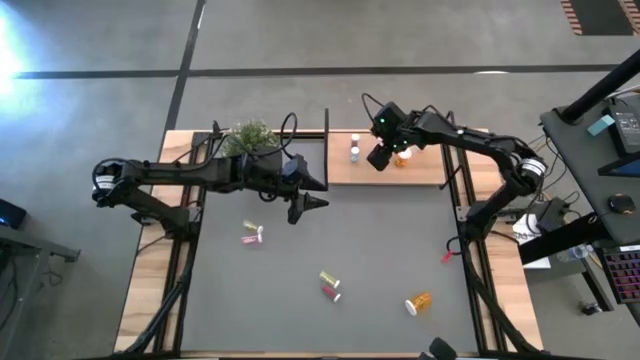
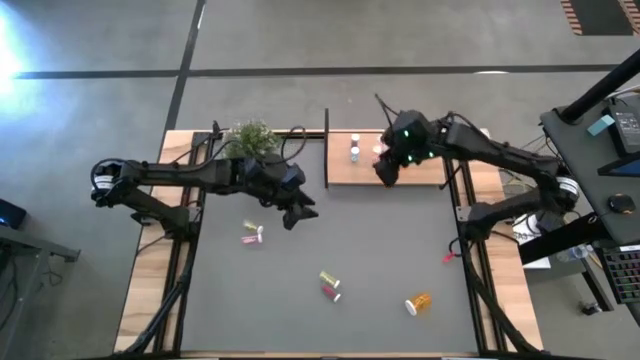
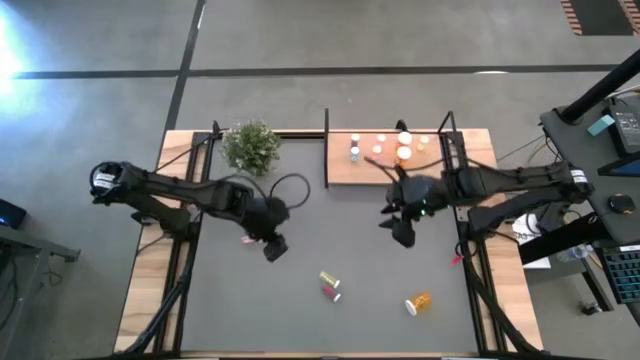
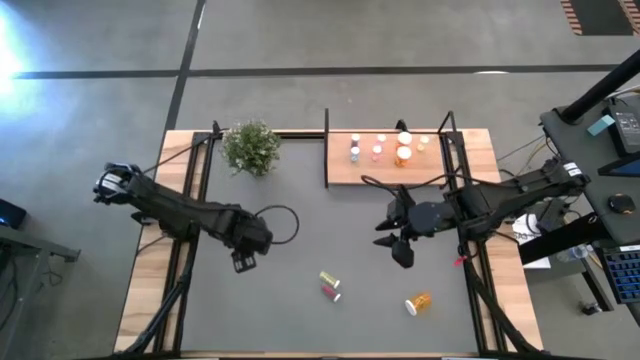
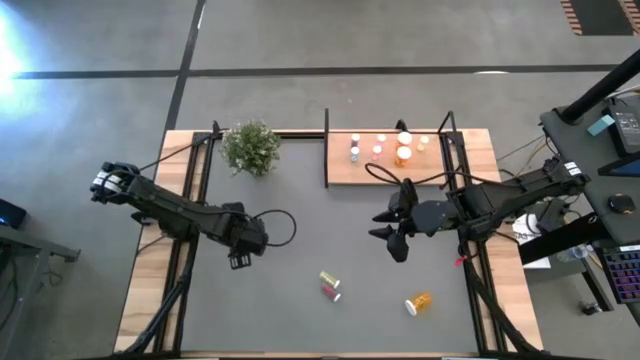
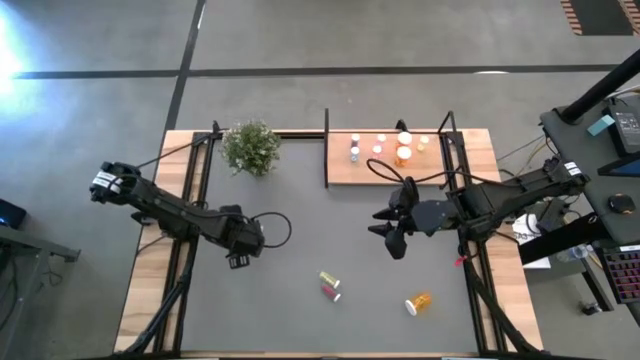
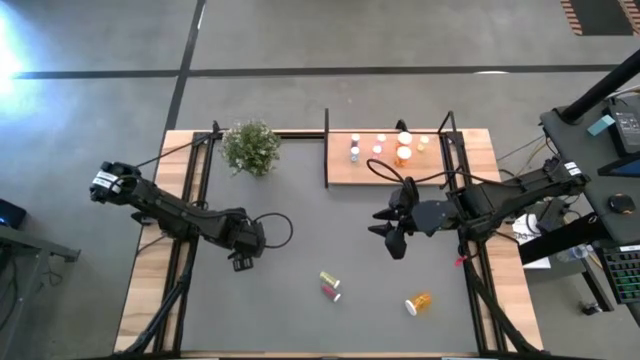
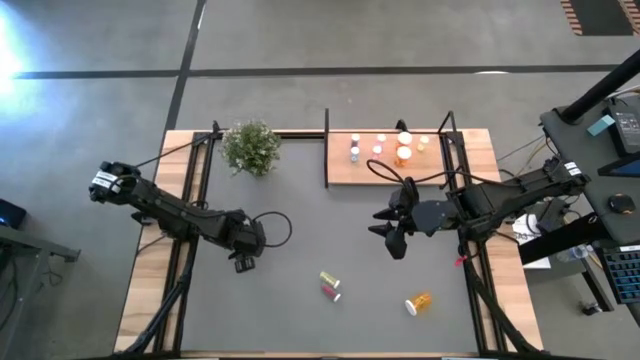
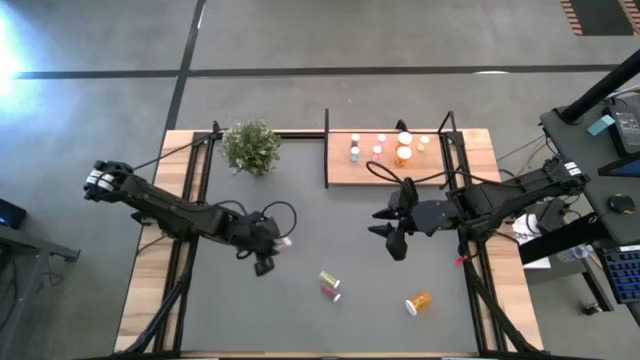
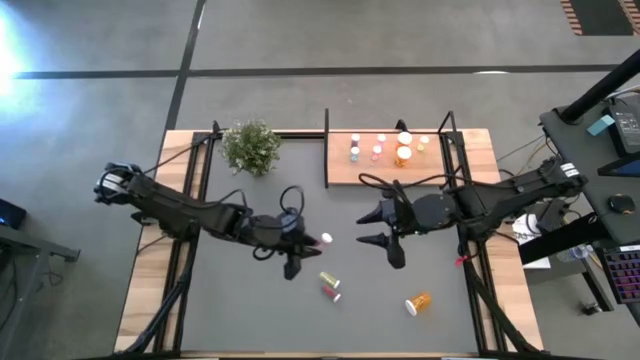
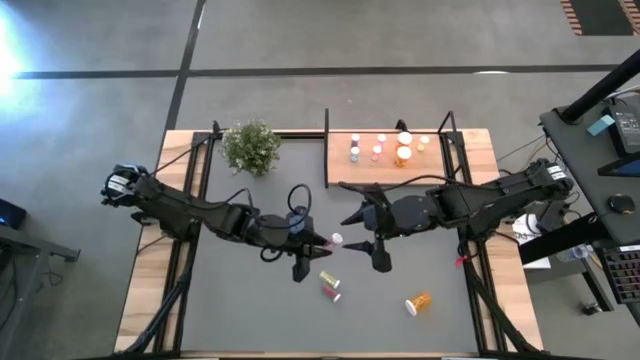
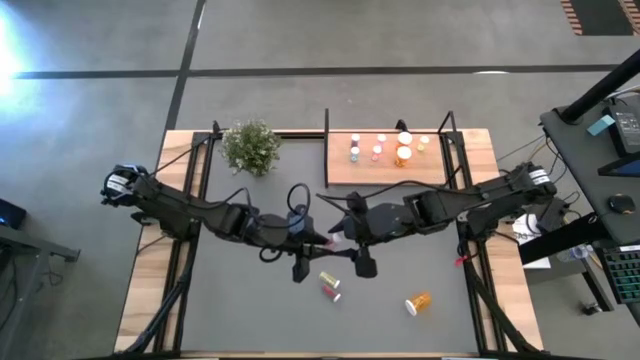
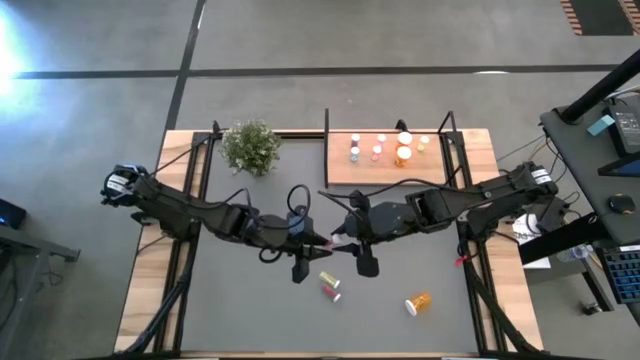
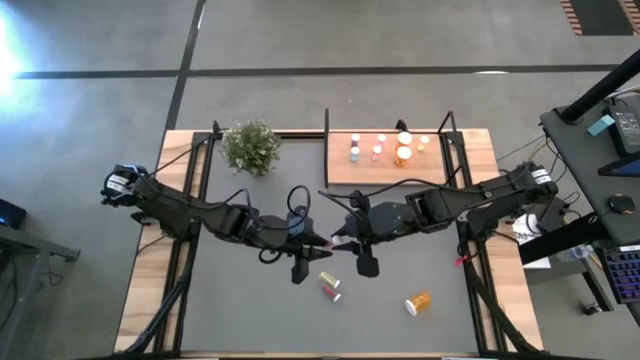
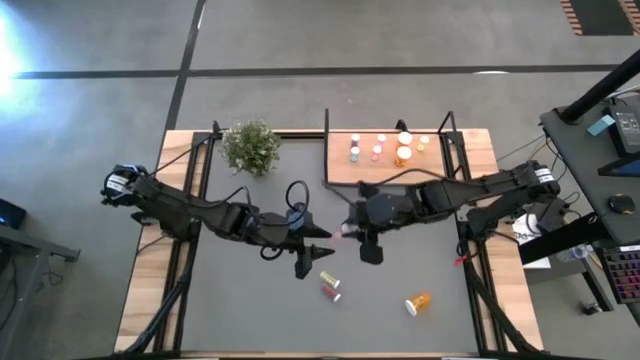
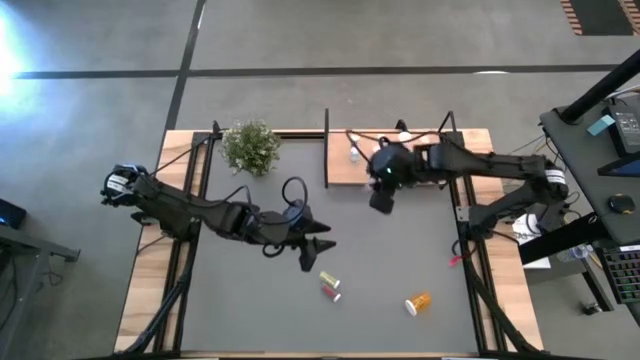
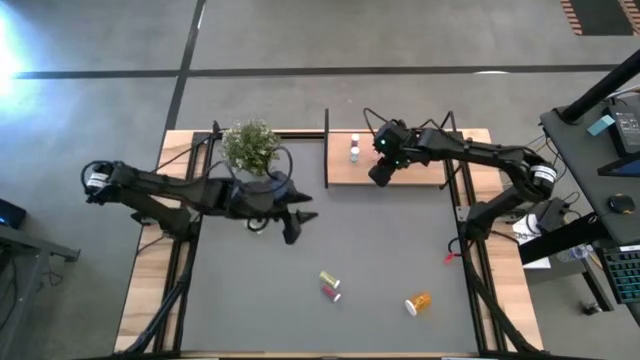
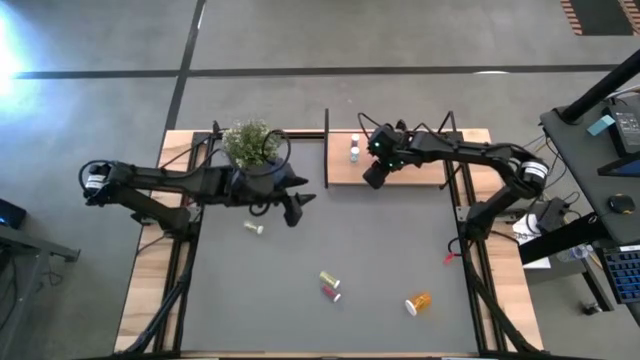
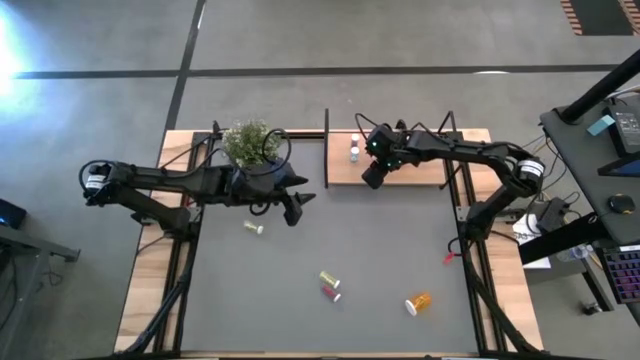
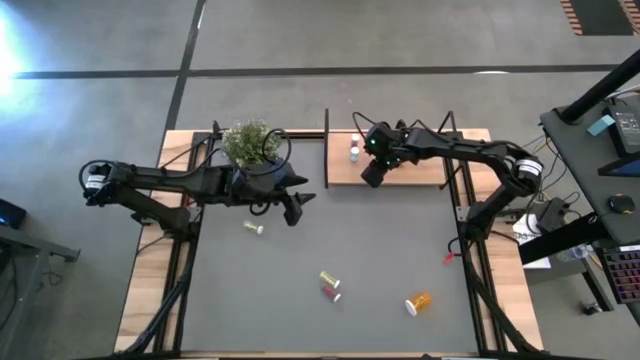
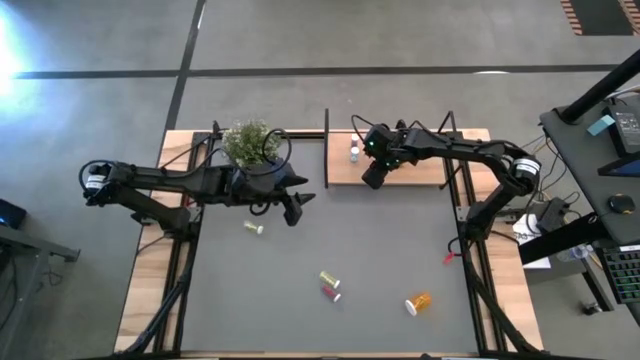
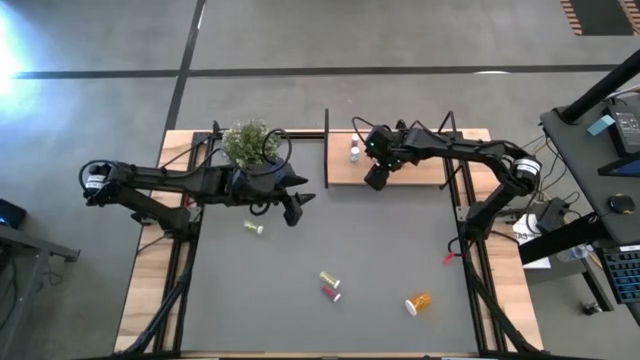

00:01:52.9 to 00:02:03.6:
Task: Pick and place medicine bottles onto shelf by color
Put the pink pill bottle on the shelf aligned with the other pink pill bottles

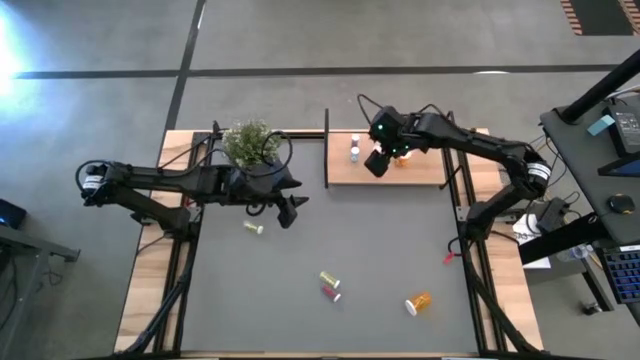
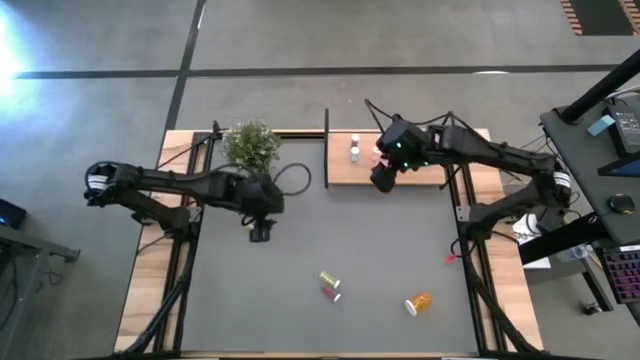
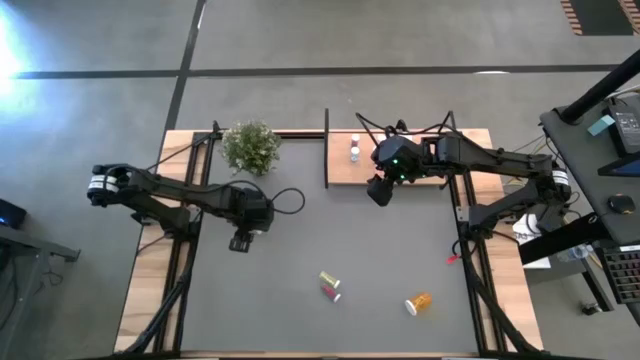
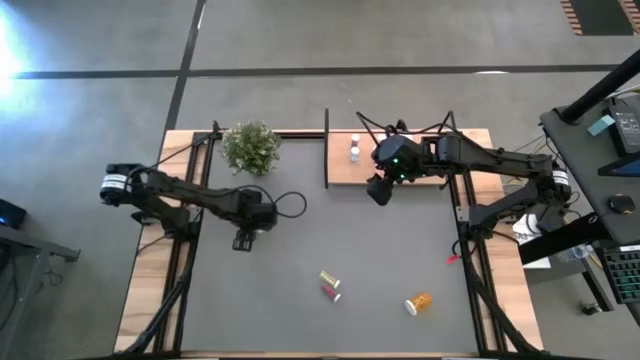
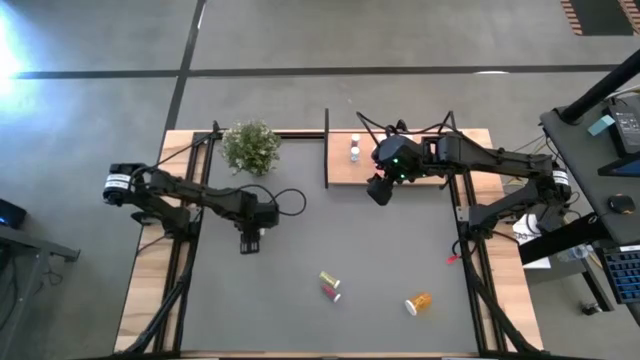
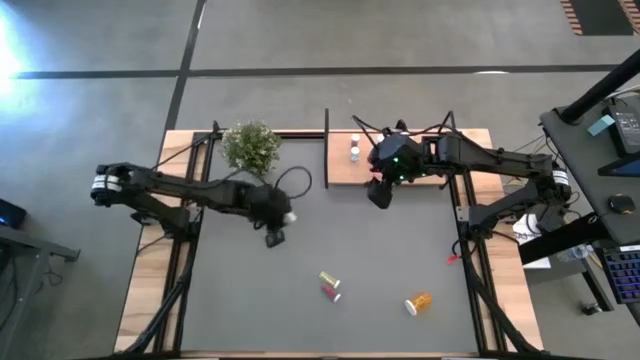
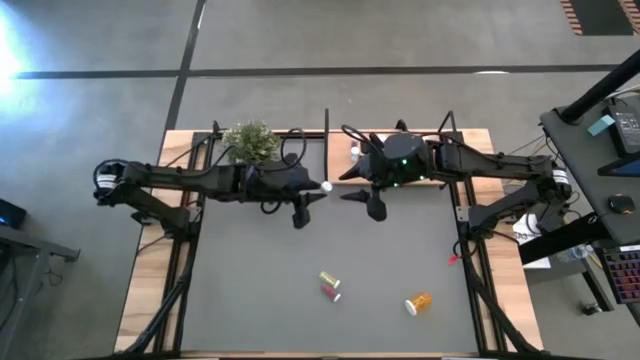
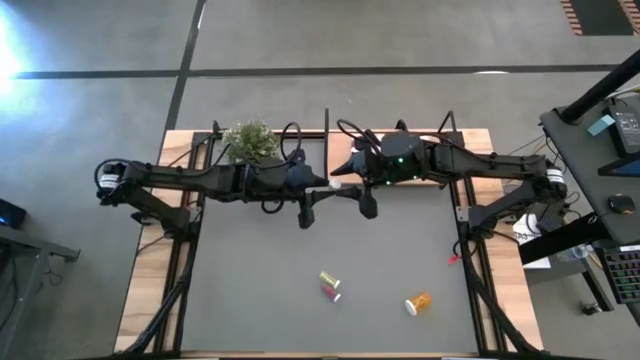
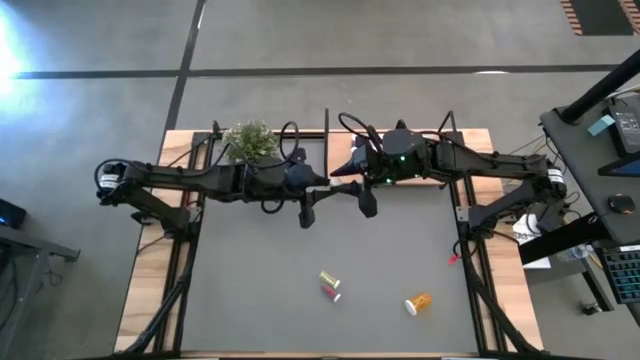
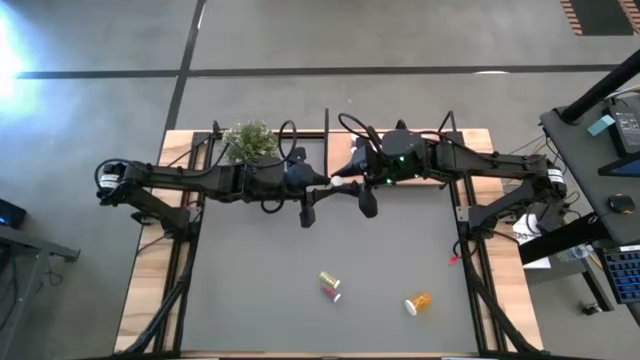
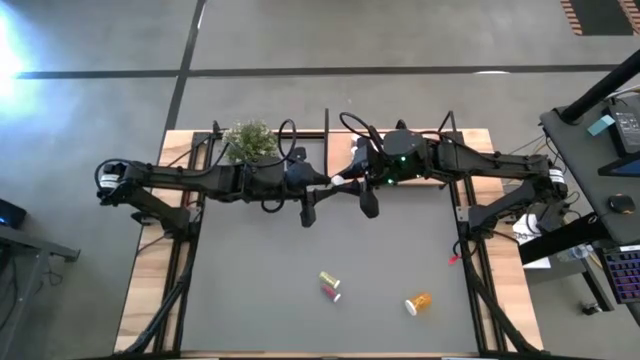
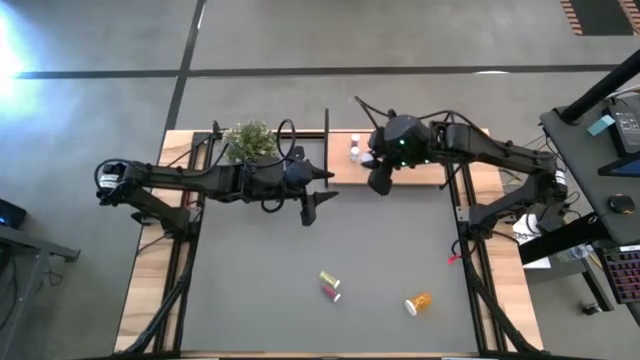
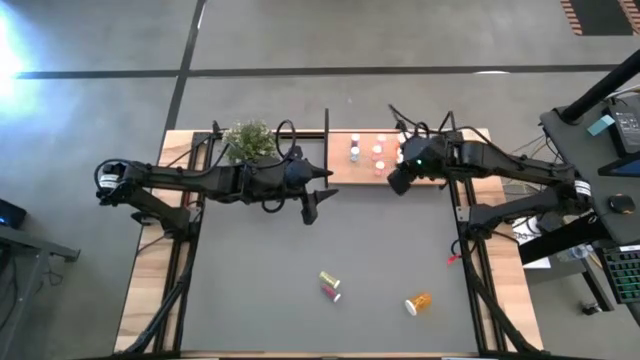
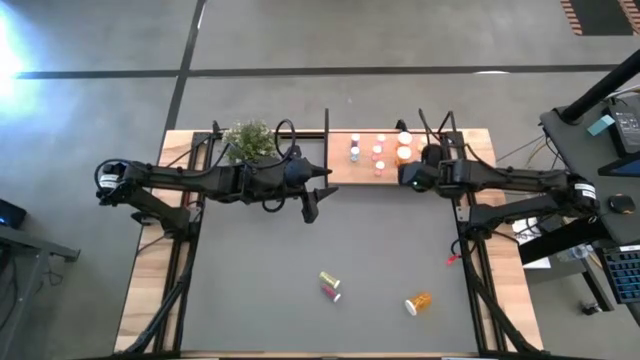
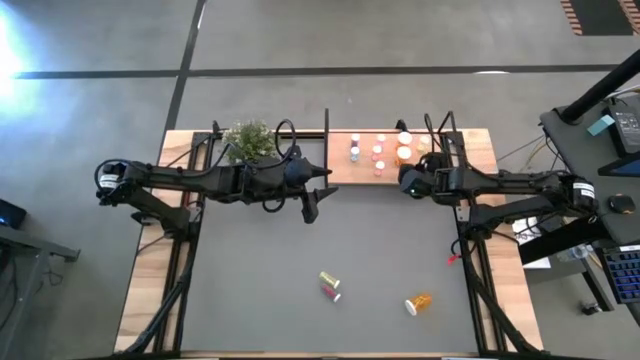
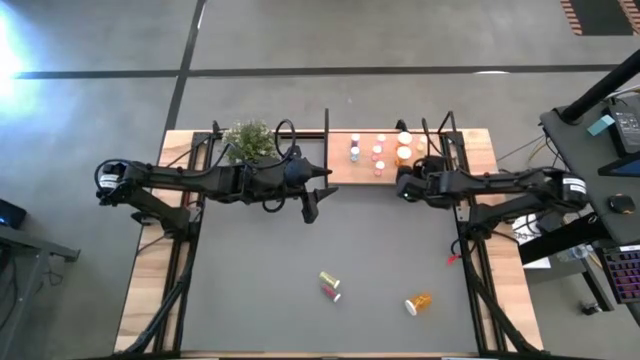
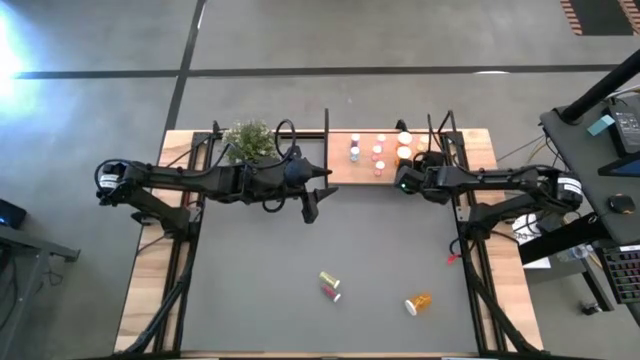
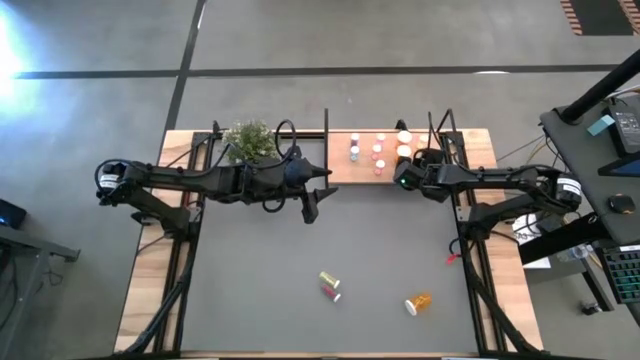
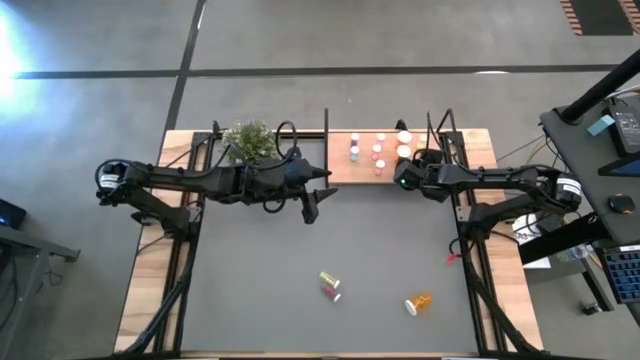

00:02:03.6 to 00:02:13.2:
Put the left yellow pill bottle on the shelf aligned with the other yellow pill bottle

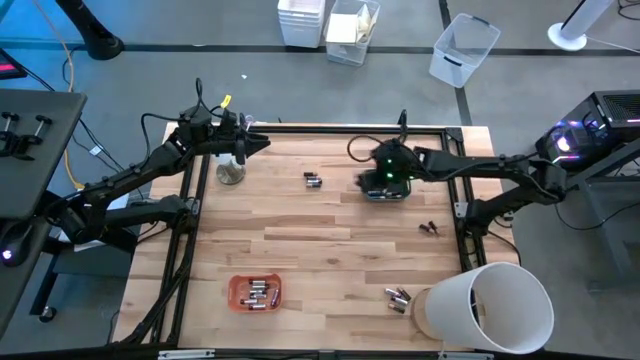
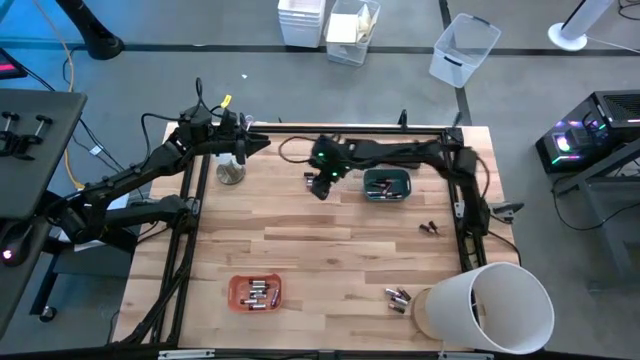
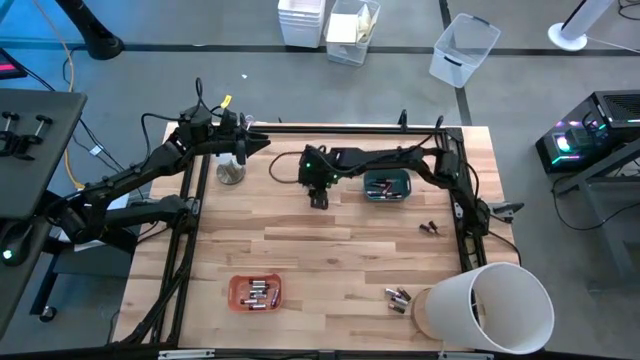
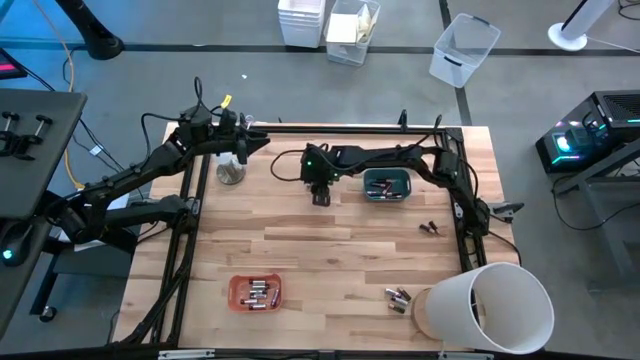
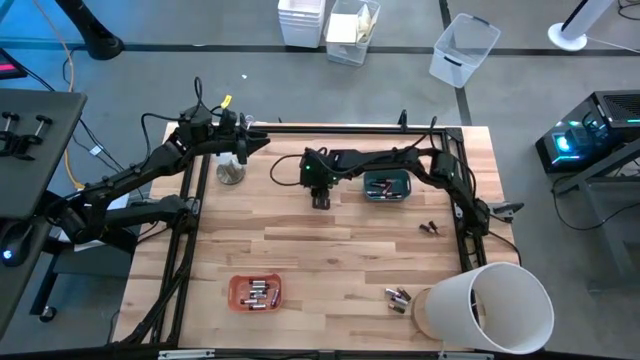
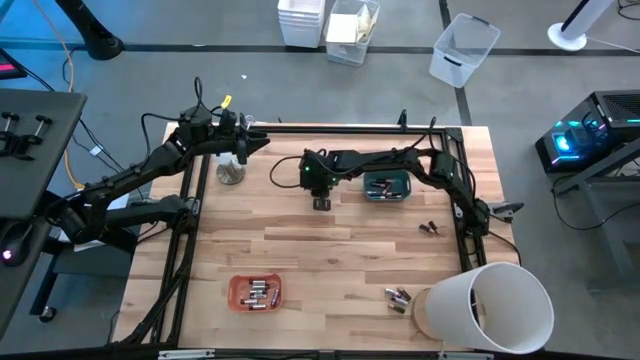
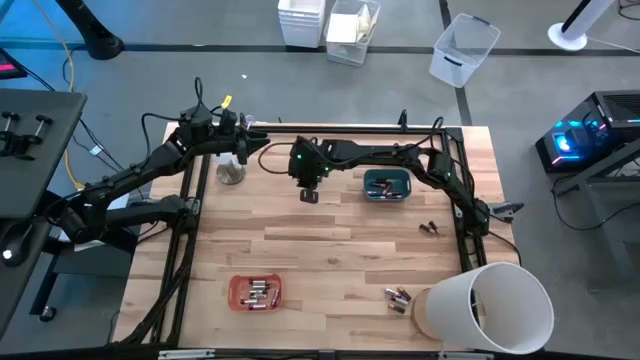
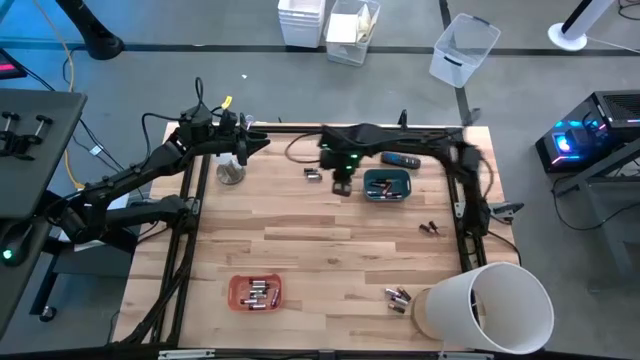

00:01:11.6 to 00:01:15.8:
Task: Sort batteries
Put the black battery into the blue bin
